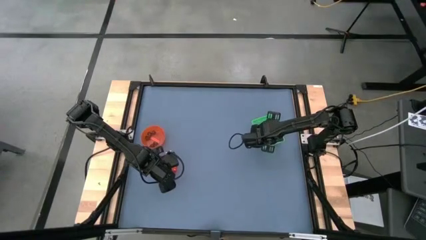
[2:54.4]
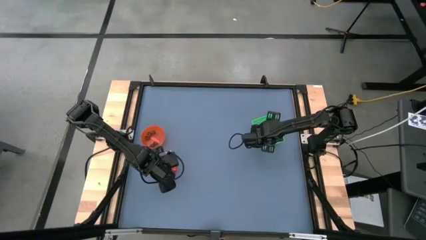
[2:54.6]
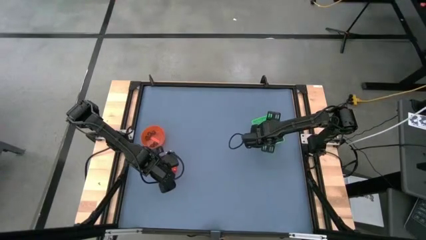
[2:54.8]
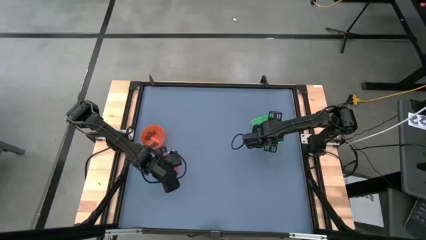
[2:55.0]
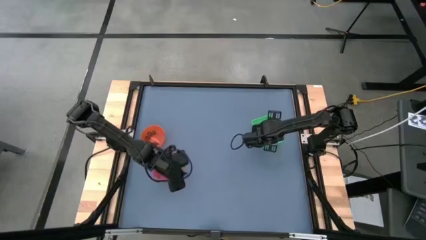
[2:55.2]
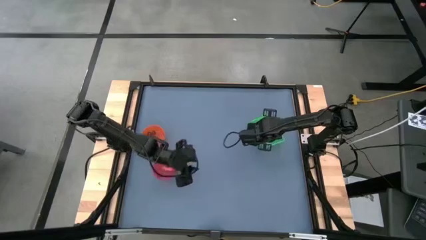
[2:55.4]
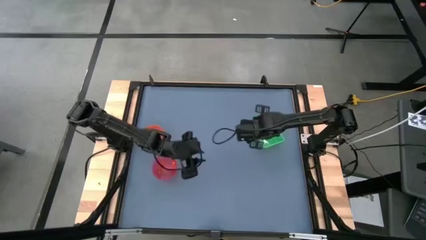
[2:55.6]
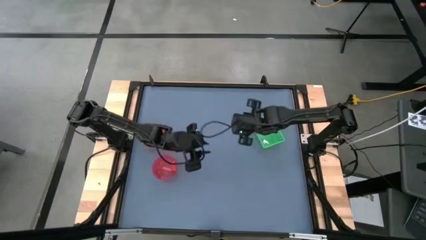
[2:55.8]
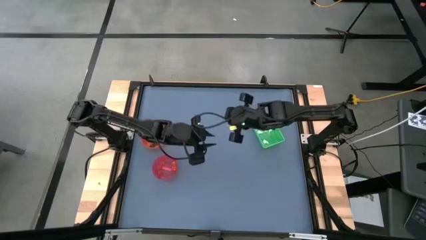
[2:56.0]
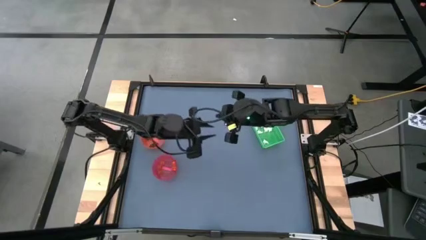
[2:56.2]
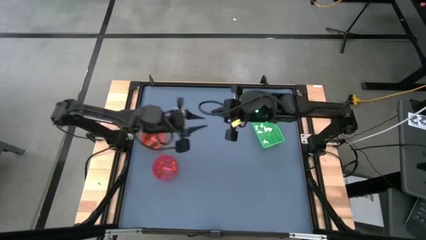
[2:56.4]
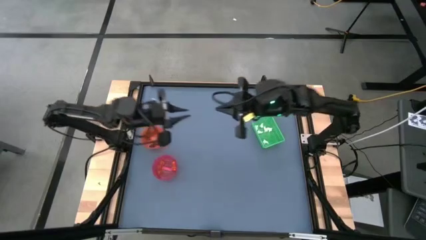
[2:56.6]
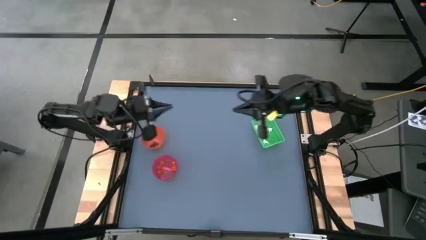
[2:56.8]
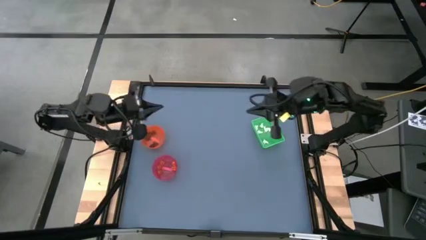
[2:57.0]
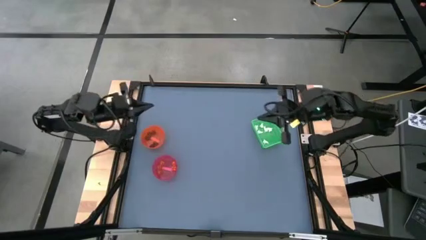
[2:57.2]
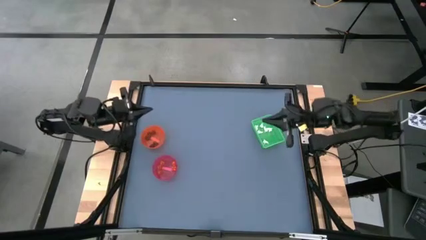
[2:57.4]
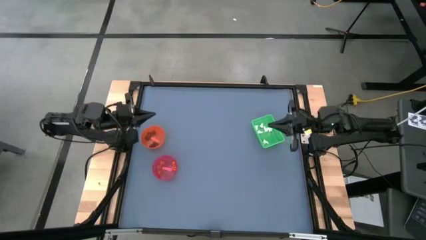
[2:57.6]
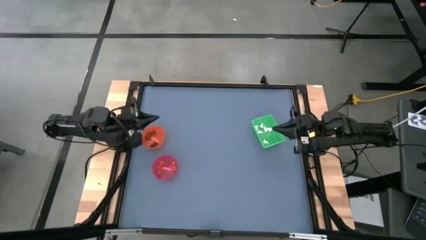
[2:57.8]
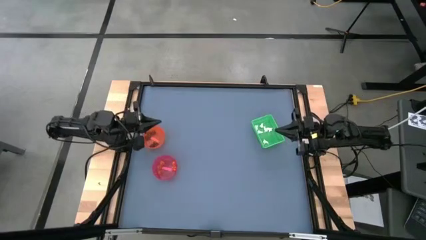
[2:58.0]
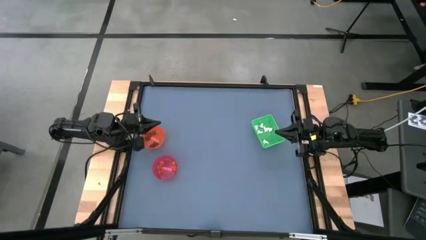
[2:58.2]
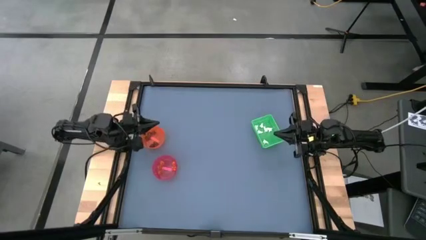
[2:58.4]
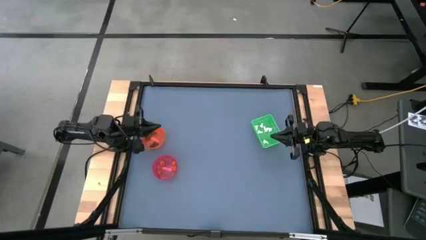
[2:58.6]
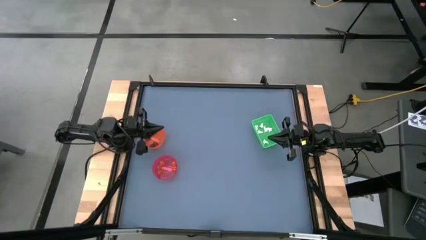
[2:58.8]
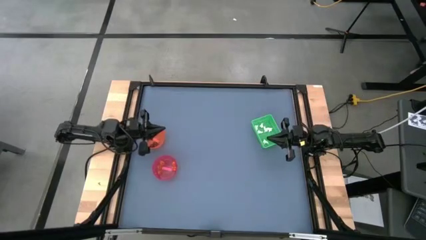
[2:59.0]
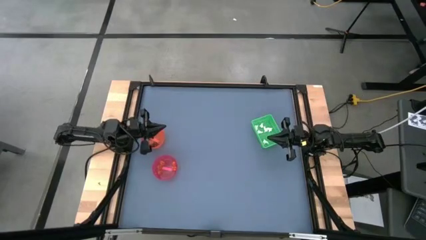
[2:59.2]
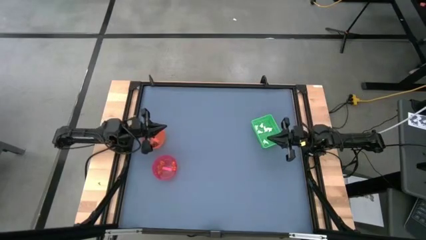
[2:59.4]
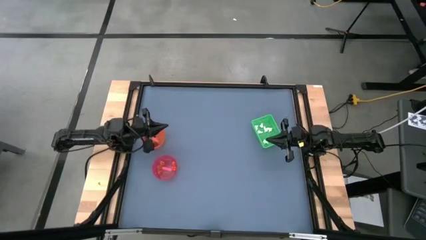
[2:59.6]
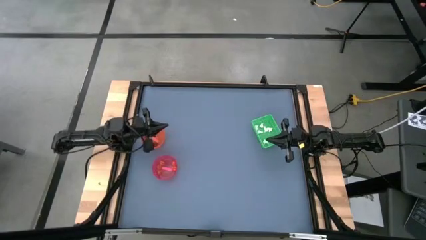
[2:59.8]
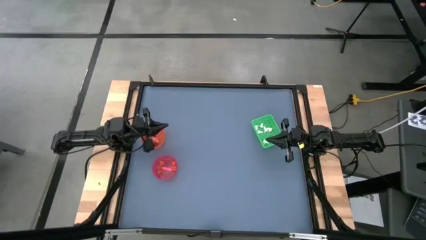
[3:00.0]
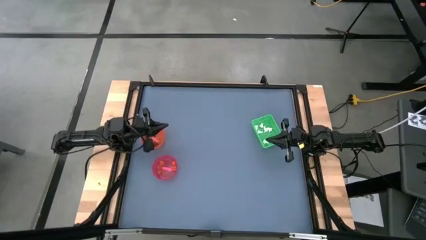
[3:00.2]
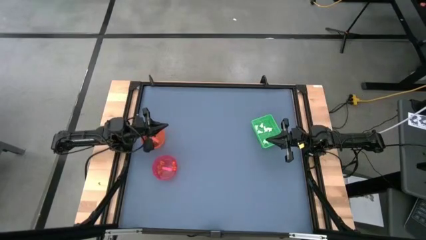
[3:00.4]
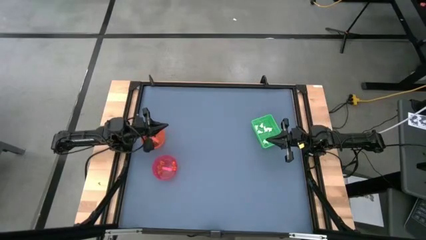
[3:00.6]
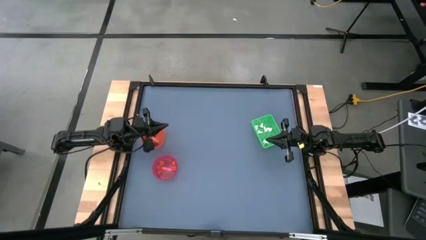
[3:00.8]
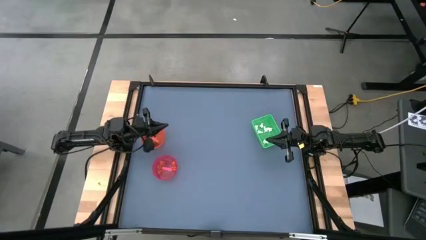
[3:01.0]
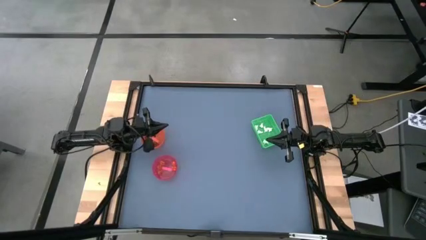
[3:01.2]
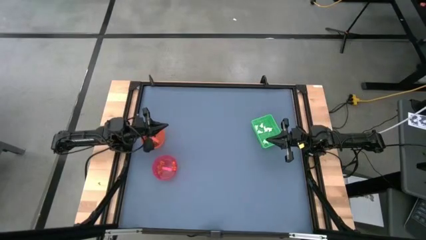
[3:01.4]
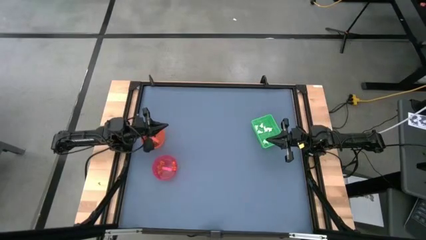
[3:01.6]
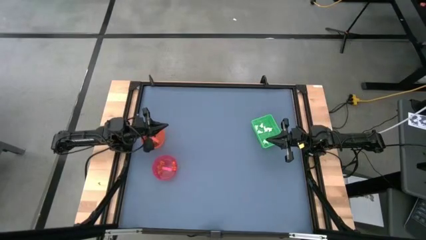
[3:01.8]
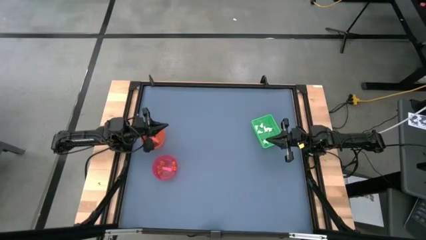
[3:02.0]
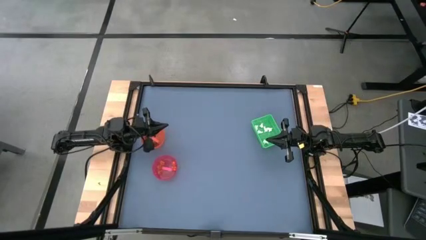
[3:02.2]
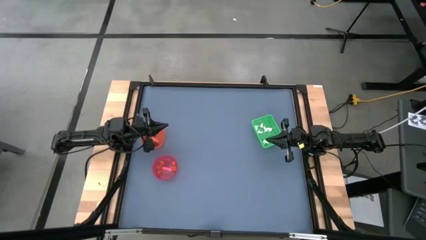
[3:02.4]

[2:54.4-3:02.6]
Task: Sort Halloween decoration
Return to Home Position

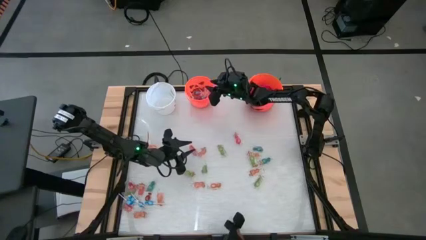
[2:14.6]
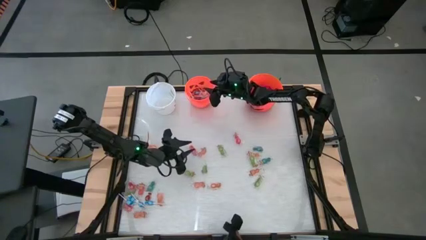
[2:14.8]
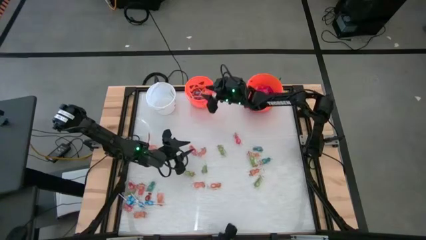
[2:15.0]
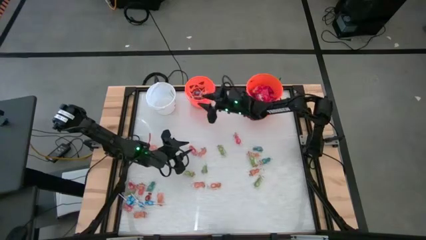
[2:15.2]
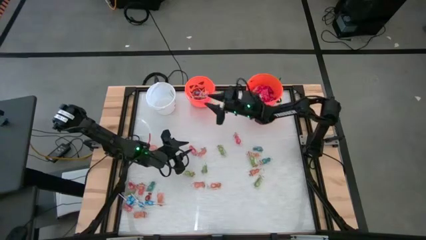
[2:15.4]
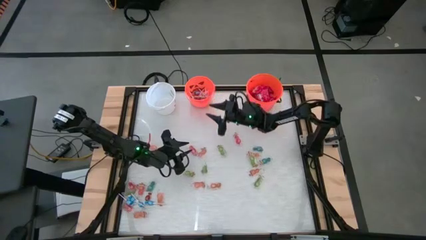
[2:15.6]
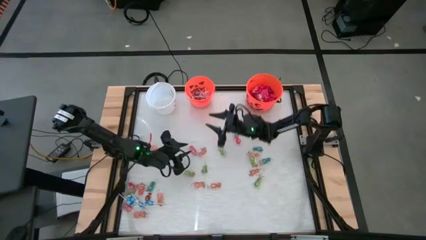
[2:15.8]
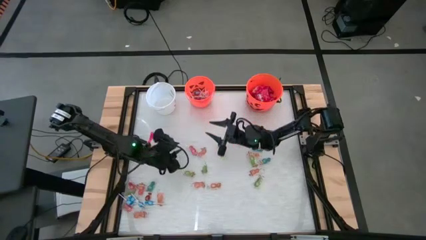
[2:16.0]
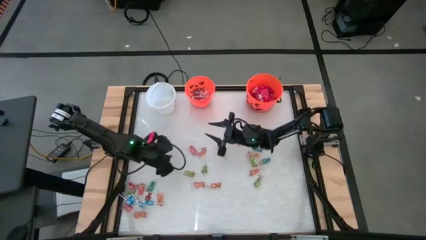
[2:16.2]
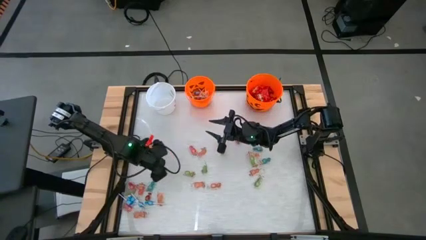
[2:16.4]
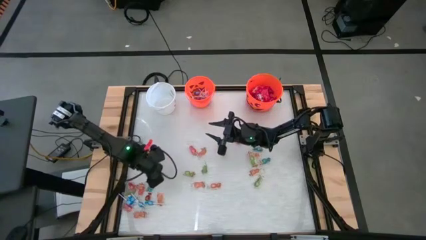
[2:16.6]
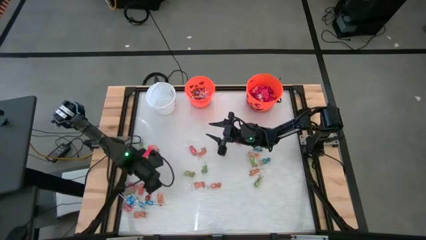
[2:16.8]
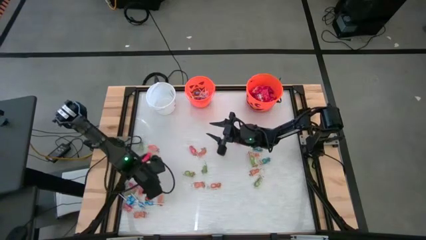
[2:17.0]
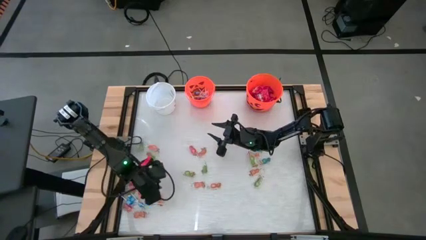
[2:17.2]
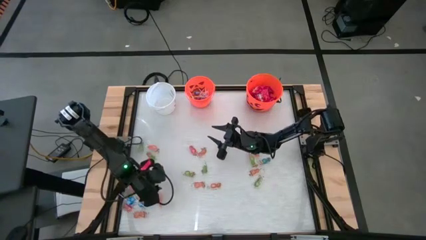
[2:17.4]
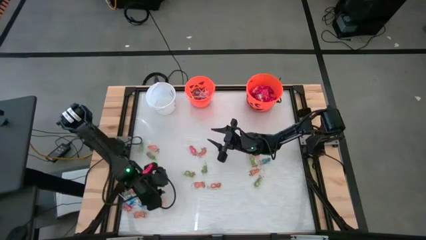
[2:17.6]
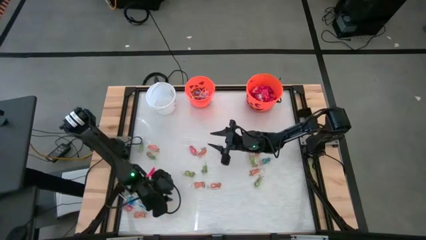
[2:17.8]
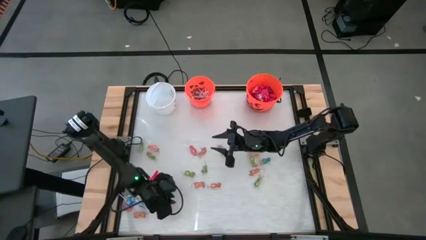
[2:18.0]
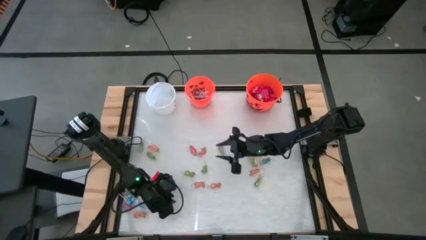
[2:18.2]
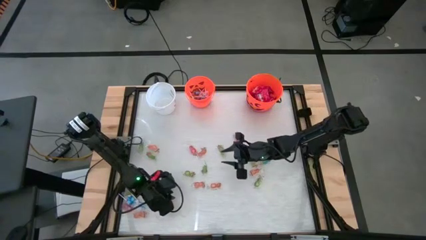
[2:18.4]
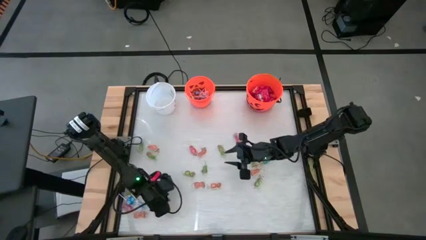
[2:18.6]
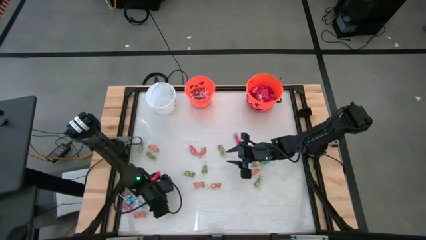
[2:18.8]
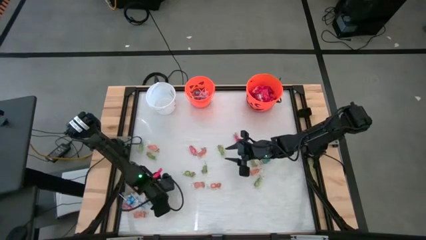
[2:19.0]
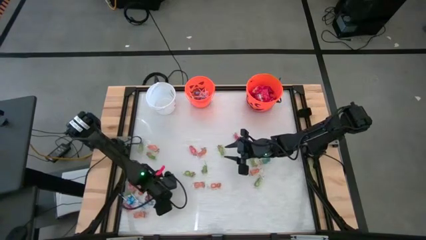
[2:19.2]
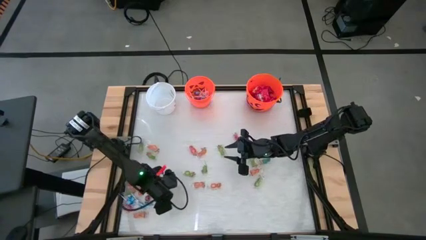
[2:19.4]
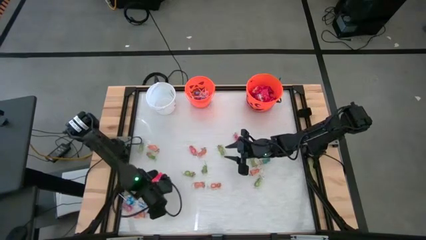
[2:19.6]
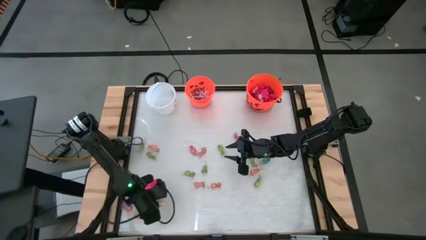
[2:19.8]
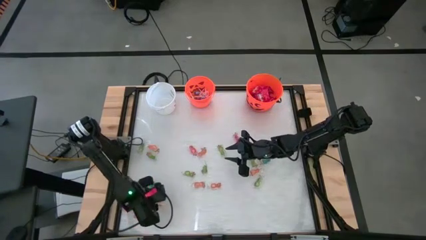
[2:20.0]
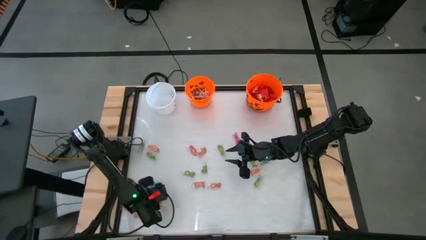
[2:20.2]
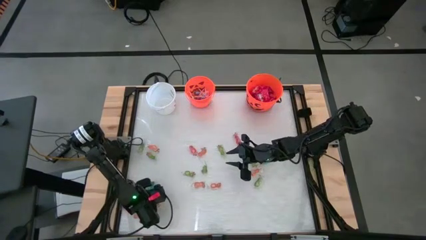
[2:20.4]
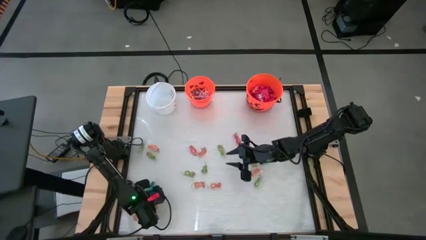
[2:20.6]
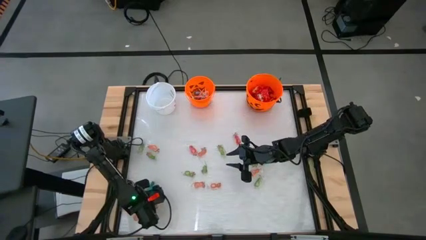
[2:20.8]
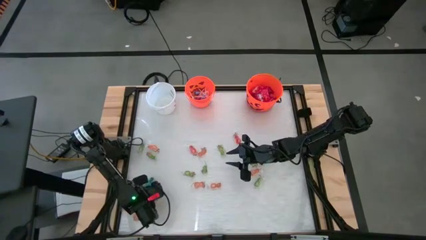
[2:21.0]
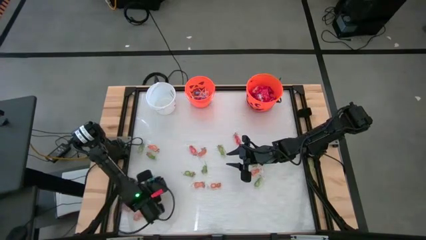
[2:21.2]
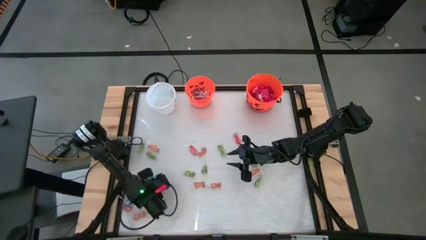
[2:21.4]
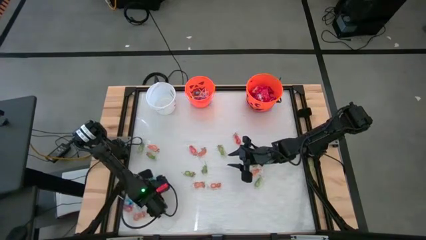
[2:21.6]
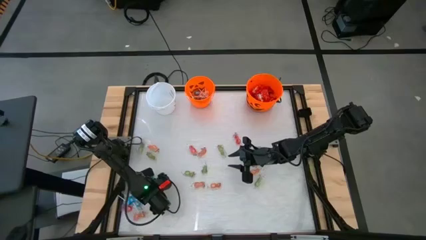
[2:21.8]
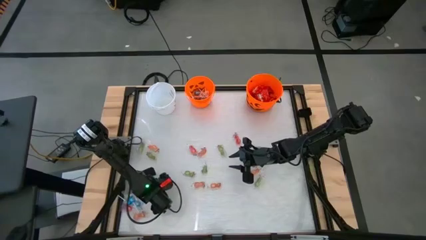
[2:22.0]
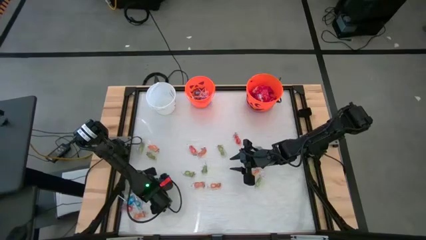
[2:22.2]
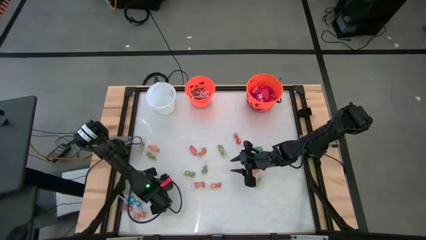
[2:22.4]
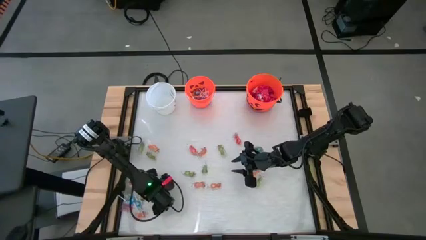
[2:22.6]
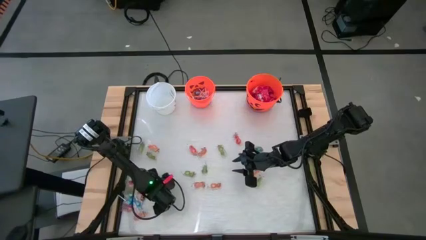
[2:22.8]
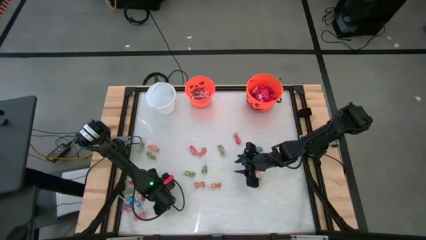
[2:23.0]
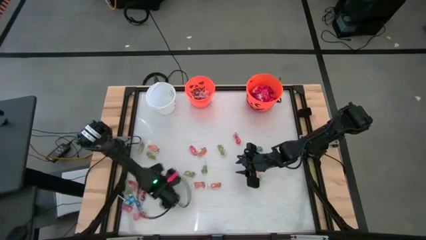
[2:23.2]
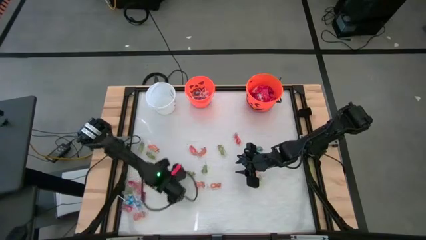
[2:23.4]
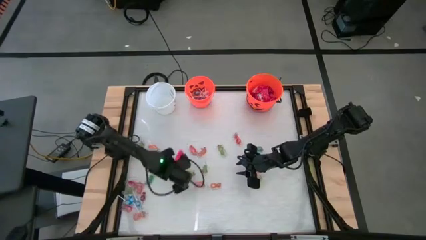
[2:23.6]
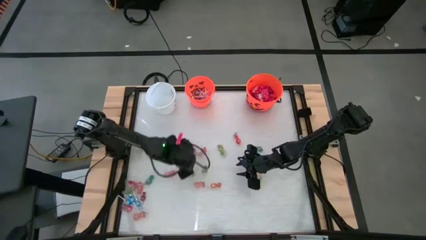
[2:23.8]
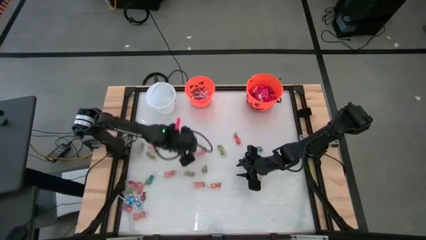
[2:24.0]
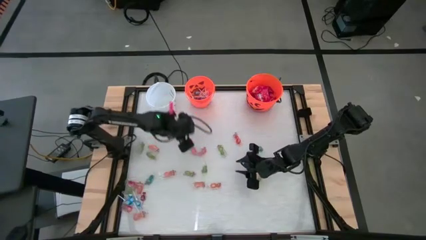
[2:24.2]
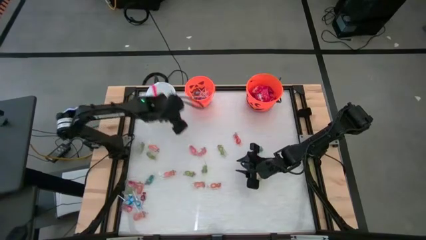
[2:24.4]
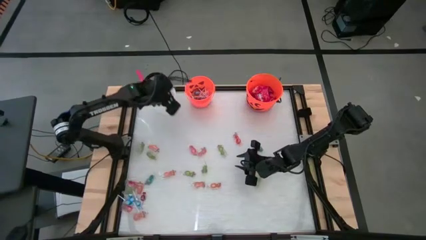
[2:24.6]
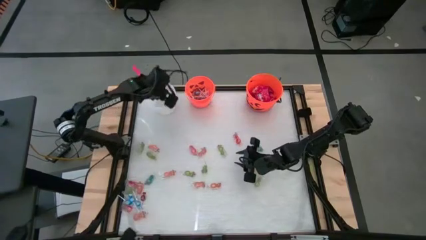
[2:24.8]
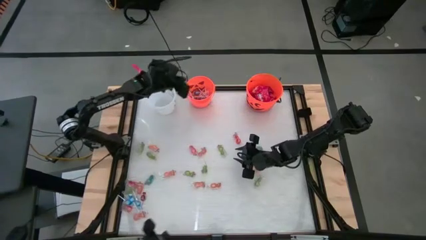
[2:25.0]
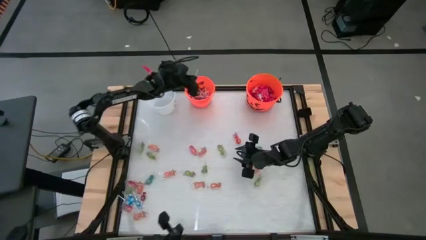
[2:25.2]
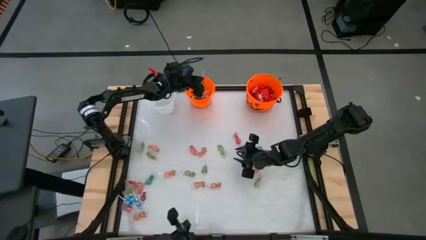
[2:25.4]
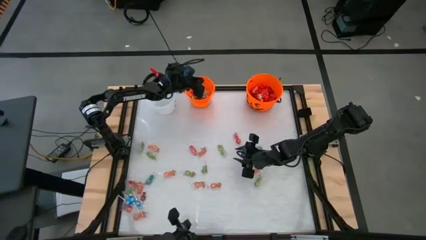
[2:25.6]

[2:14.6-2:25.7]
Task: Sort candy by brand, put in halloween buckets
Put the blue lollipop into the left orange bucket
